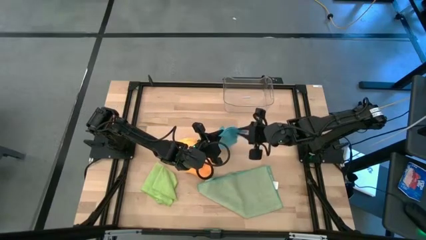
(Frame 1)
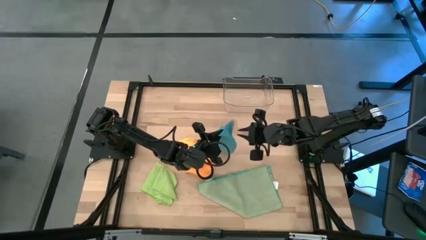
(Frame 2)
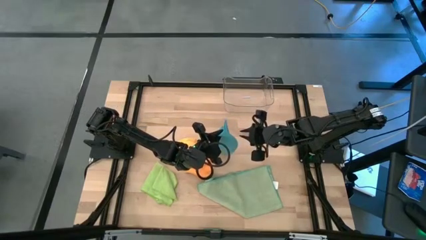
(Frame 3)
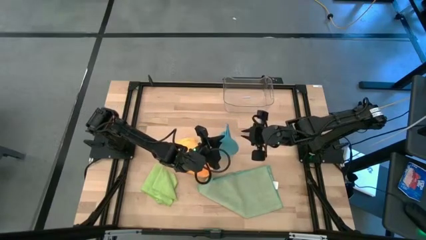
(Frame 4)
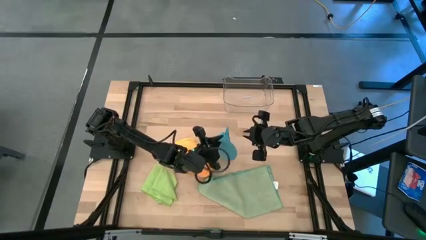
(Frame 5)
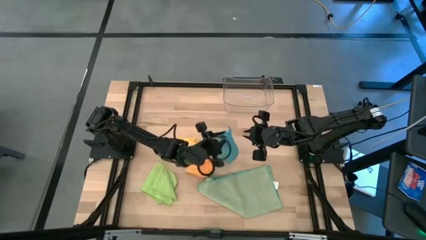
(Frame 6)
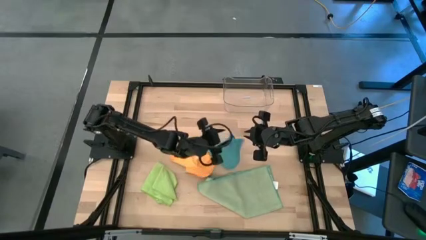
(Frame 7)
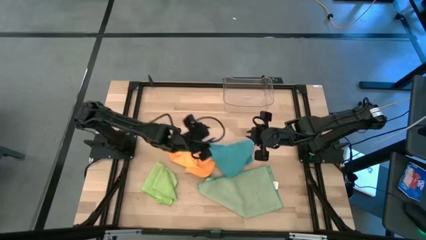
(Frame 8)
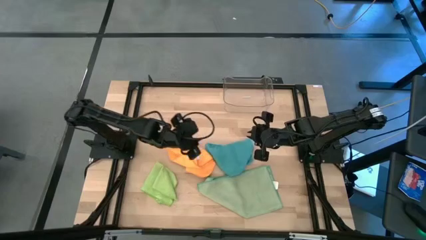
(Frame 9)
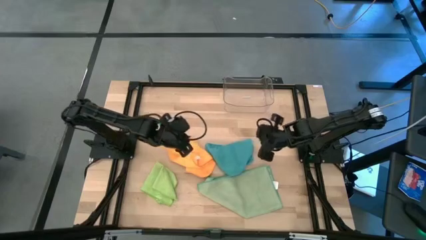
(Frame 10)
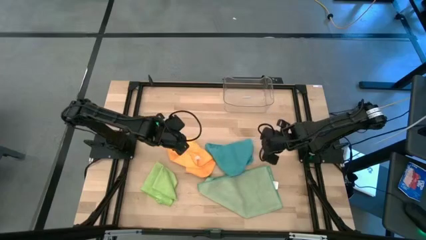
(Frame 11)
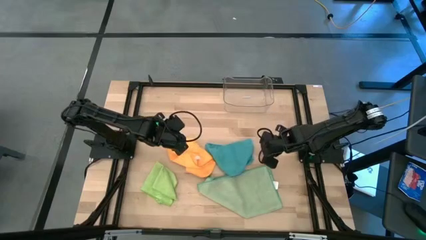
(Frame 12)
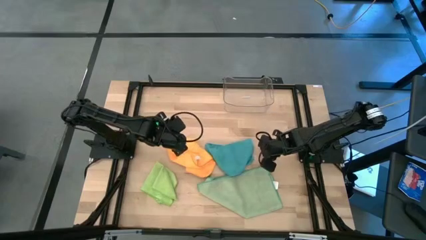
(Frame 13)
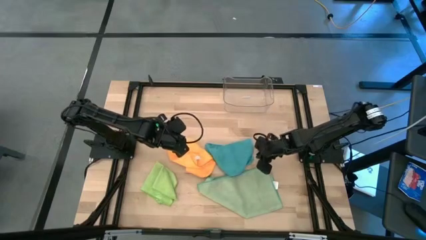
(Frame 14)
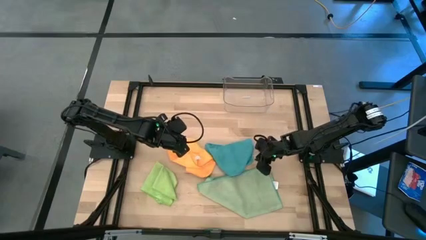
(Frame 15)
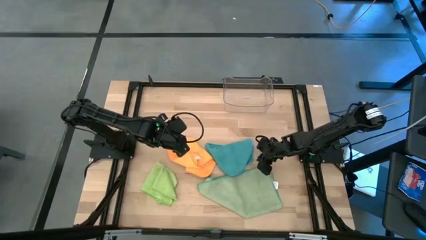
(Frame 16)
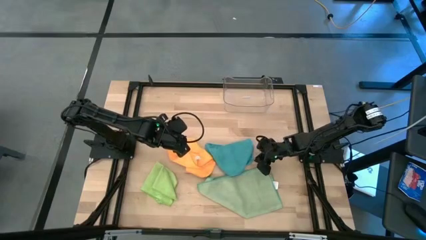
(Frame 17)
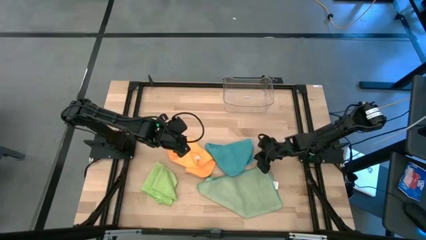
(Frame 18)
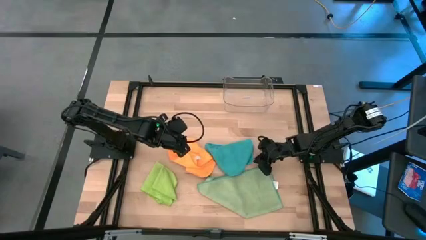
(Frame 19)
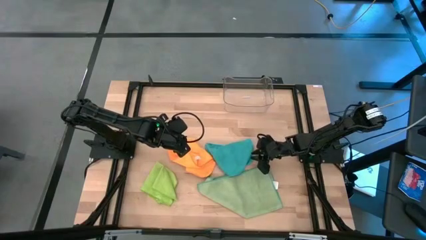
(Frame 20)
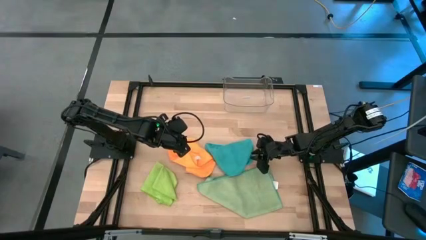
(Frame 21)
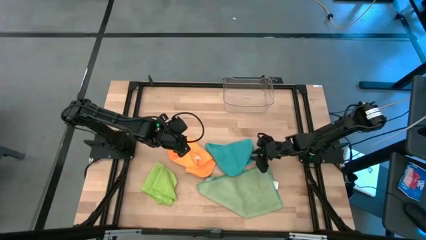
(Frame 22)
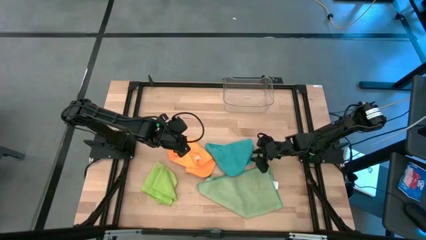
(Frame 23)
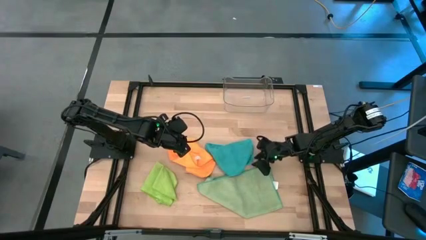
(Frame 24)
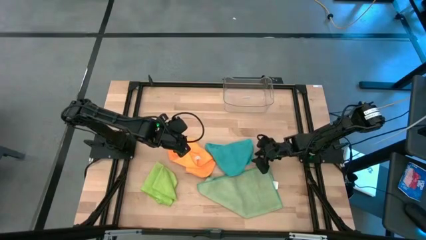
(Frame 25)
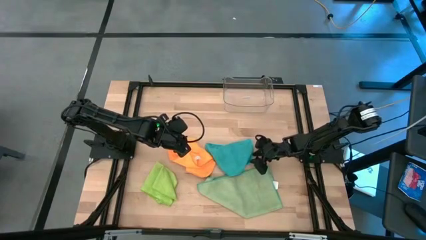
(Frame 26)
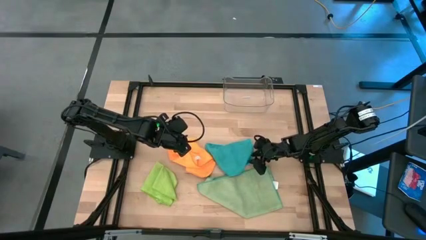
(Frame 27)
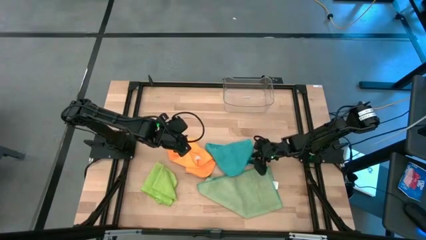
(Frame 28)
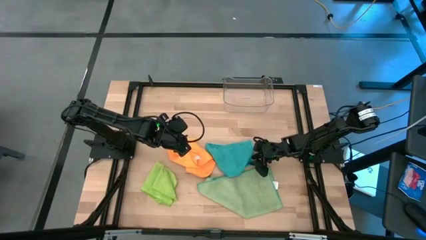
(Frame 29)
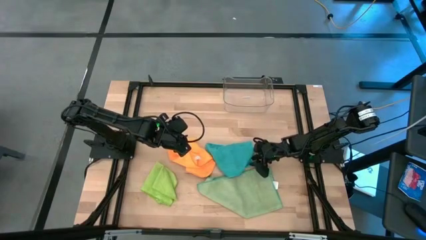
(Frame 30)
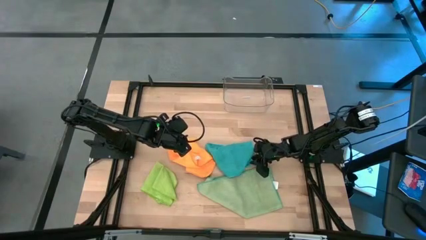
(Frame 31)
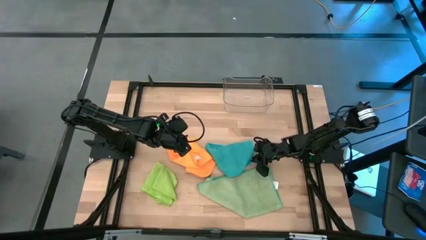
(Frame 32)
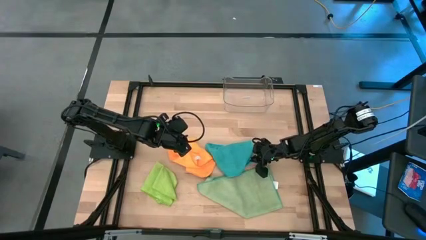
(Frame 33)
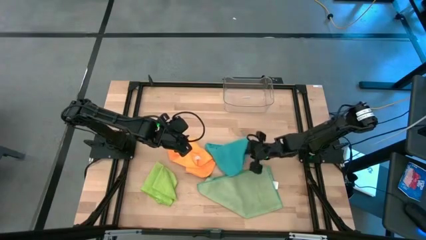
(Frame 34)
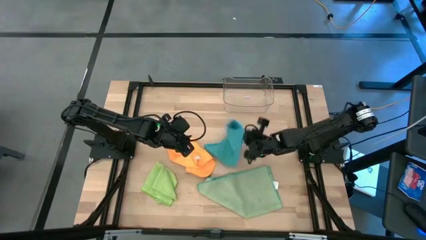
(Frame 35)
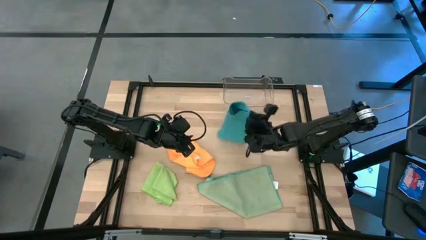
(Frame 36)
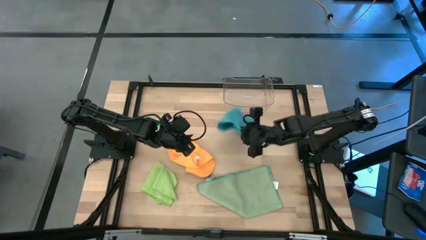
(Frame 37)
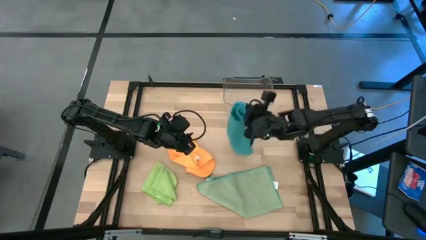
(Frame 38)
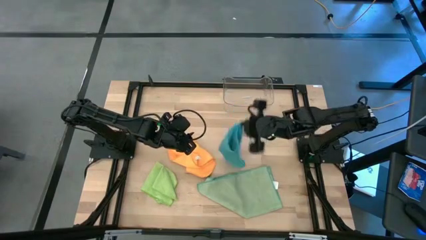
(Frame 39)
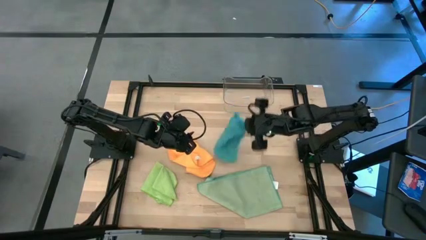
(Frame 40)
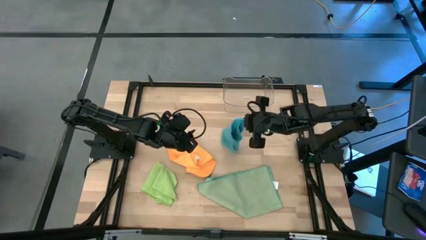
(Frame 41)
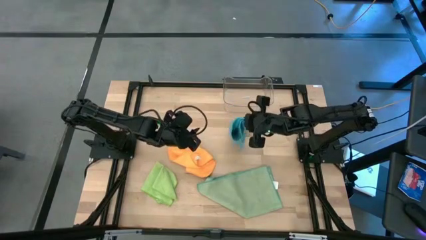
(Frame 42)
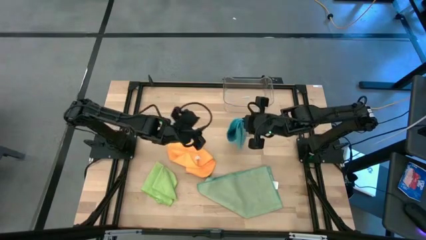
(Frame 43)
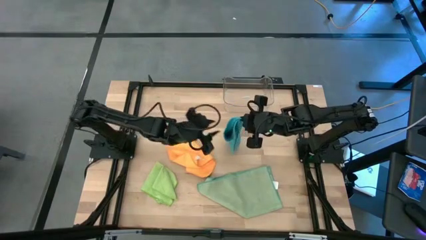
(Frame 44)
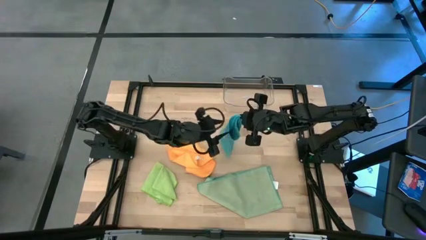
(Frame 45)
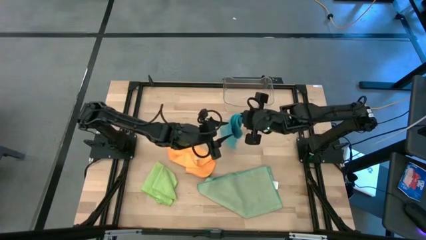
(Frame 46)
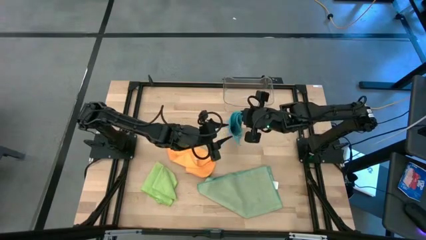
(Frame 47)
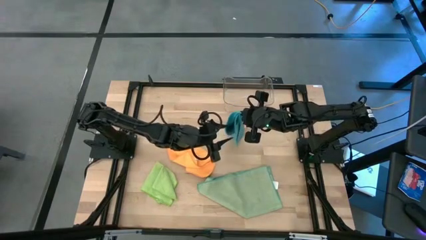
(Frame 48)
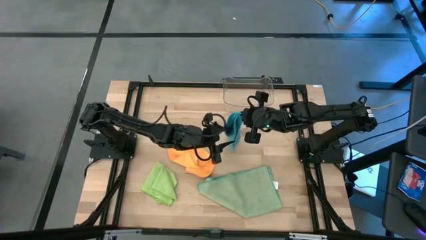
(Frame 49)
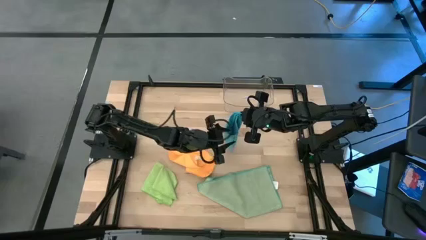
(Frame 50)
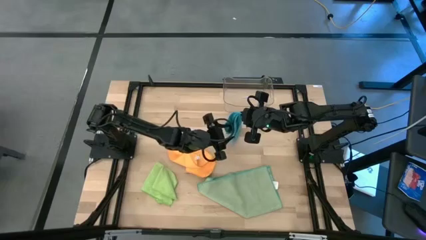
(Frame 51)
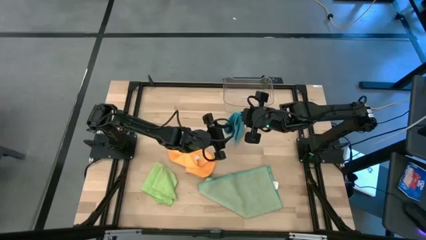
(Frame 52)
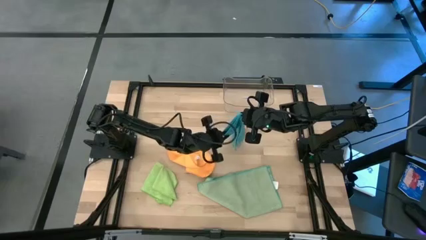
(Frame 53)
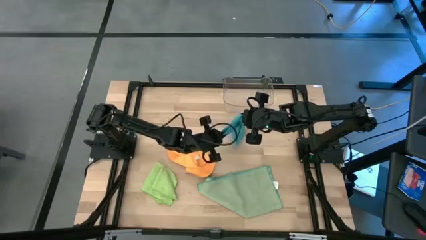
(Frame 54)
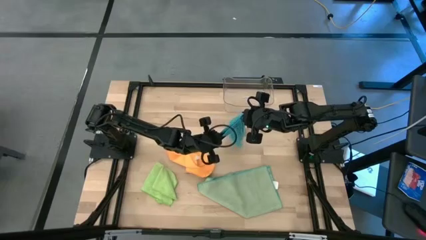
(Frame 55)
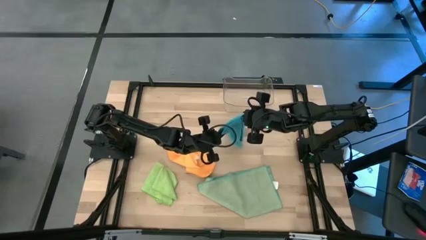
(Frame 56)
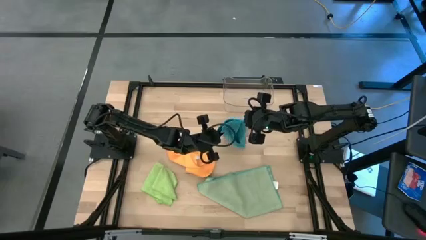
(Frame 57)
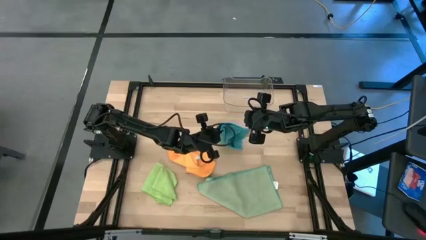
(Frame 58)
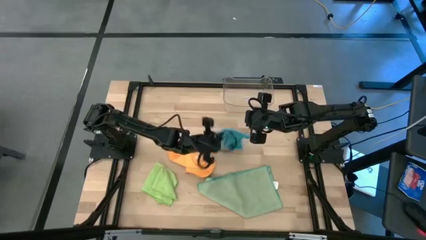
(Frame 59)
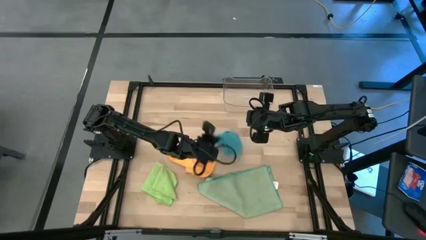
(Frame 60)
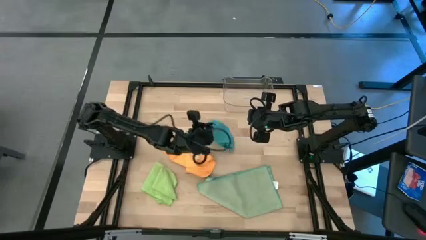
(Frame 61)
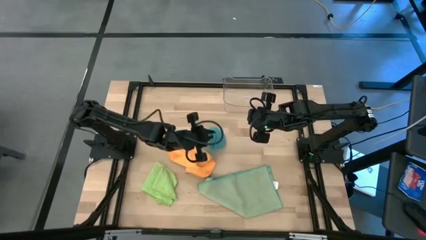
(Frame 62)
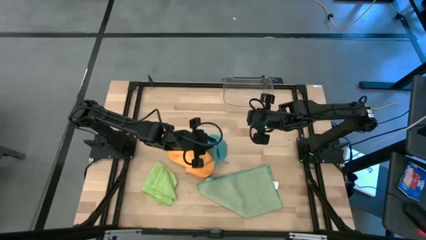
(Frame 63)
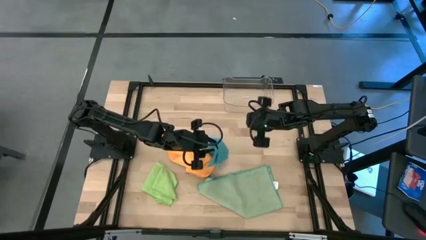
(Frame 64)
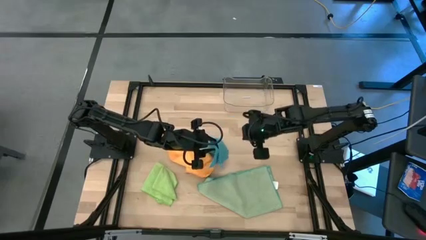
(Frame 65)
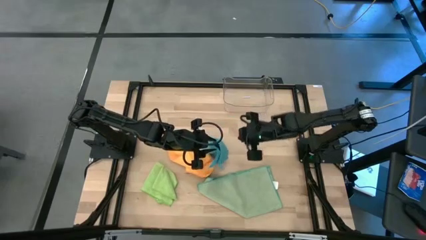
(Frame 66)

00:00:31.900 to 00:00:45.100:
Task: Fold microfiber towels
Fold the blue microfiber cloth
